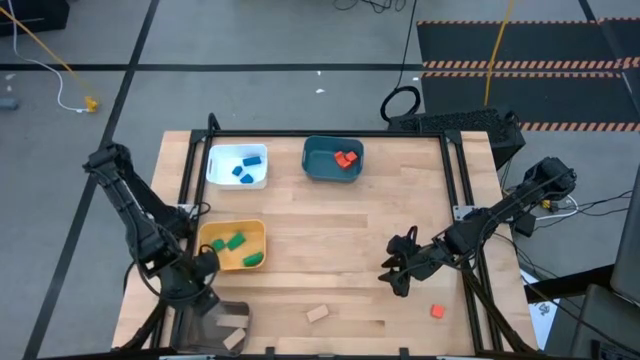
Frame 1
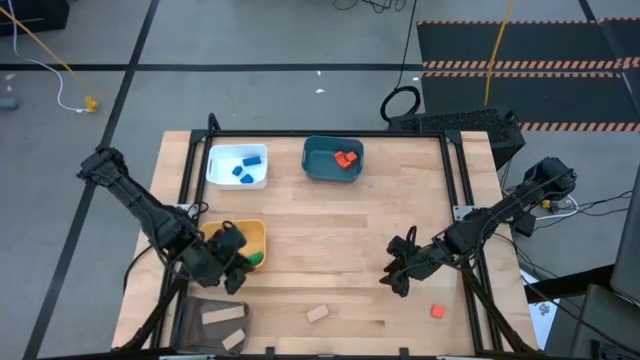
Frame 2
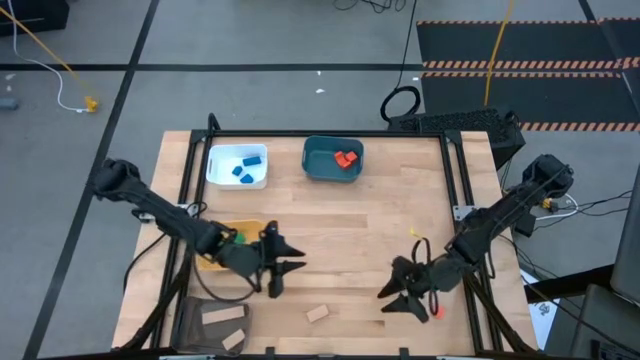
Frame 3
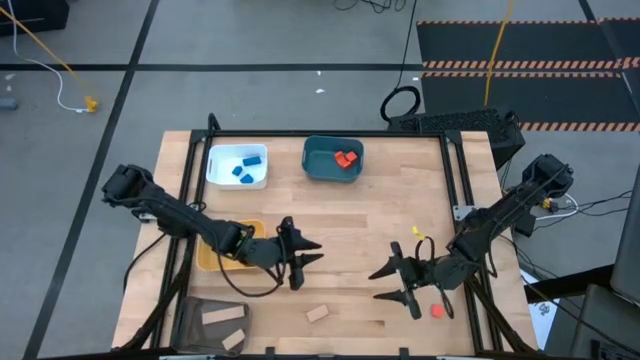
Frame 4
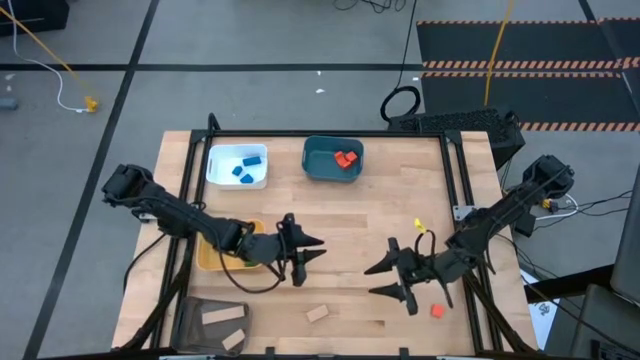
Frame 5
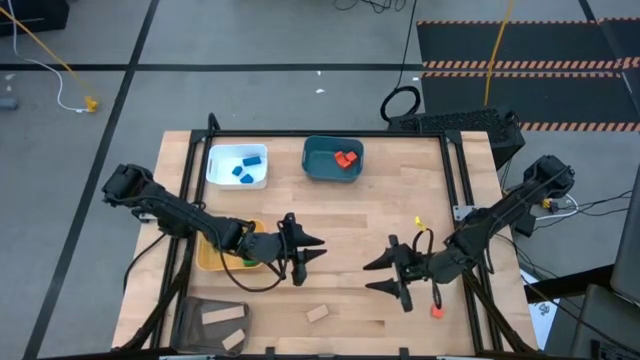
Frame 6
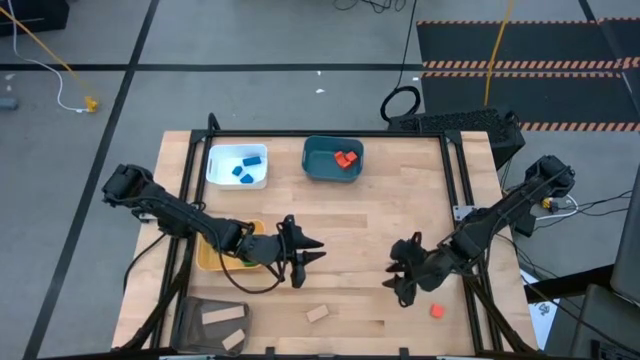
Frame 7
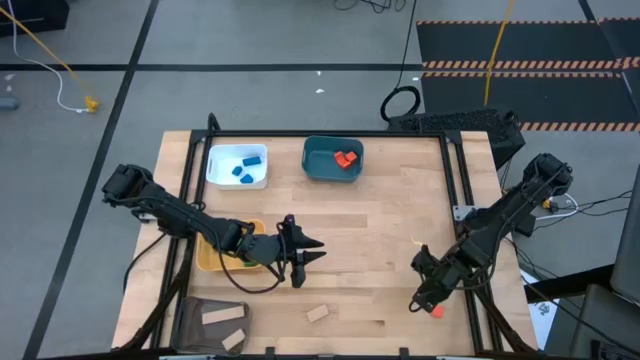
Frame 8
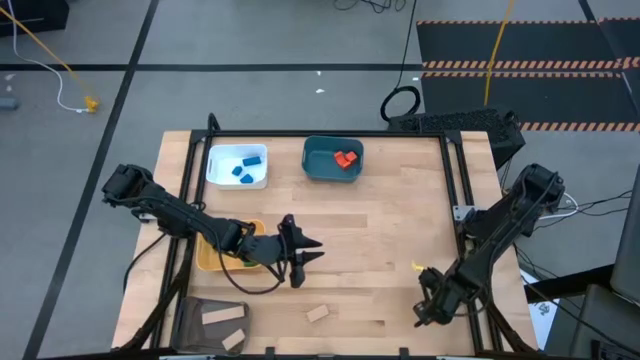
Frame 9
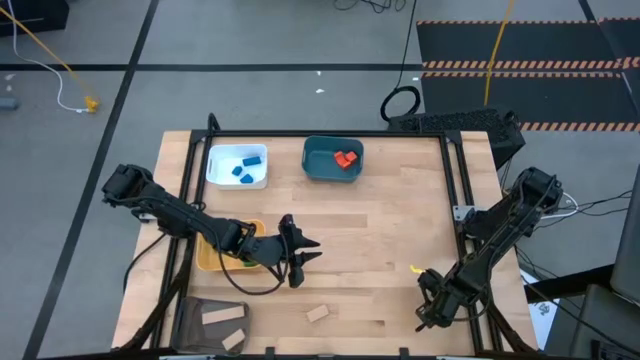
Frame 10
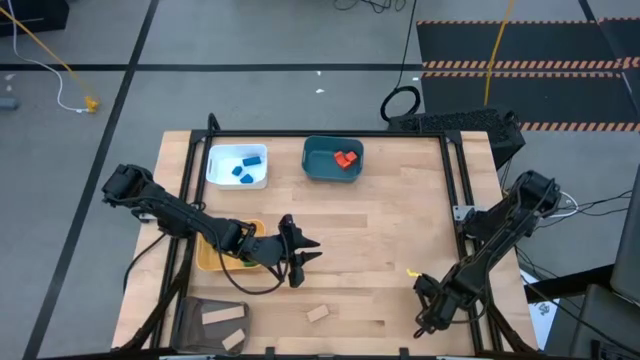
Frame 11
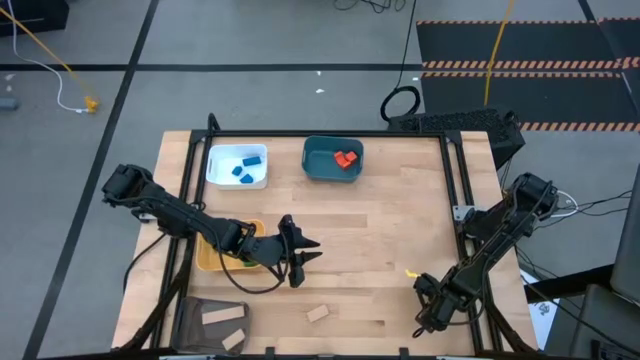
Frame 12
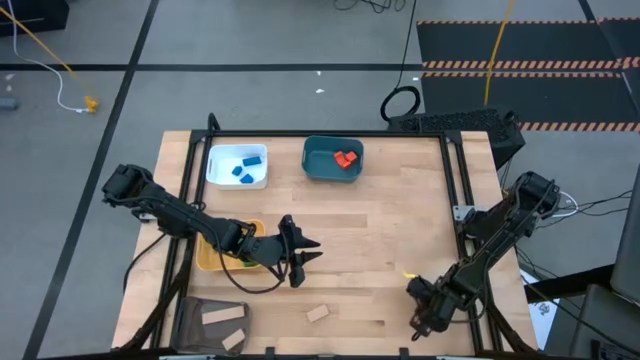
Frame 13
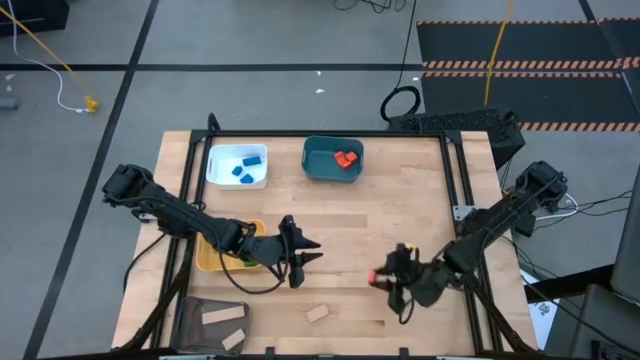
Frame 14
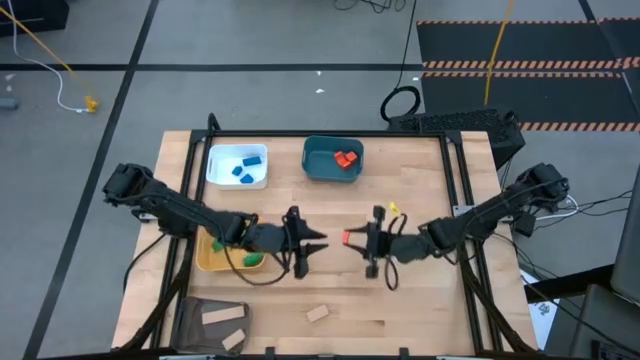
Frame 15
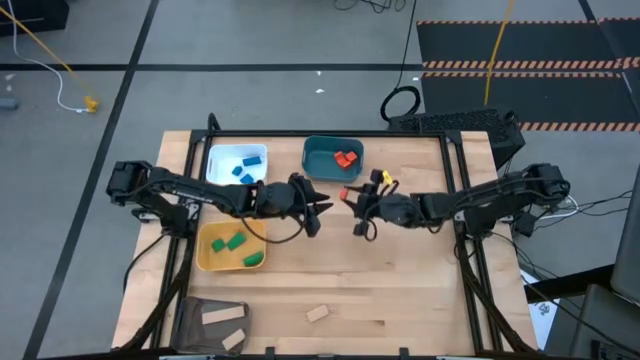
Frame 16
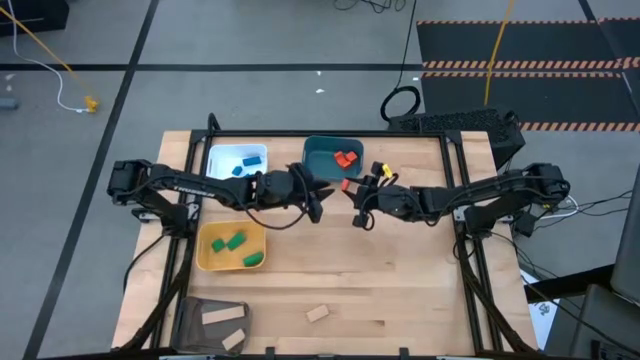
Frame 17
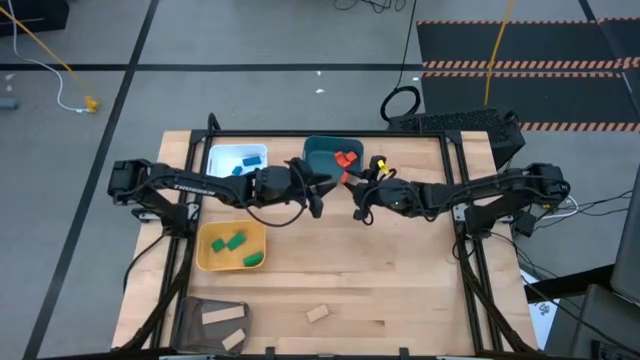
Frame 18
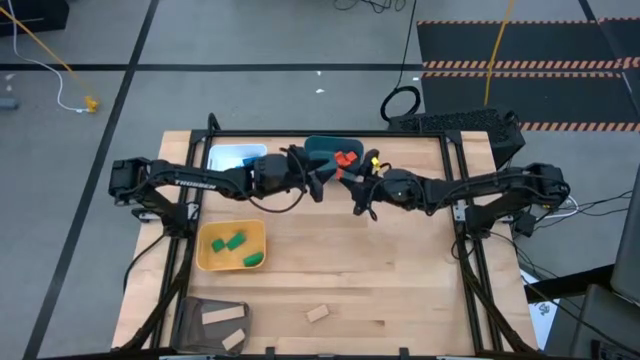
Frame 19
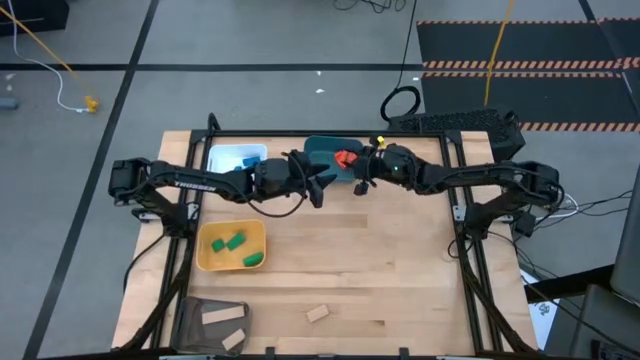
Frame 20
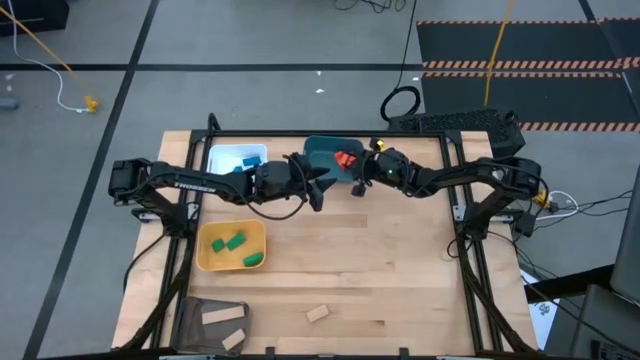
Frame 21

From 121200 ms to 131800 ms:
Task: Sort & place blocks by color
Put the orange wooden block into the blue bin

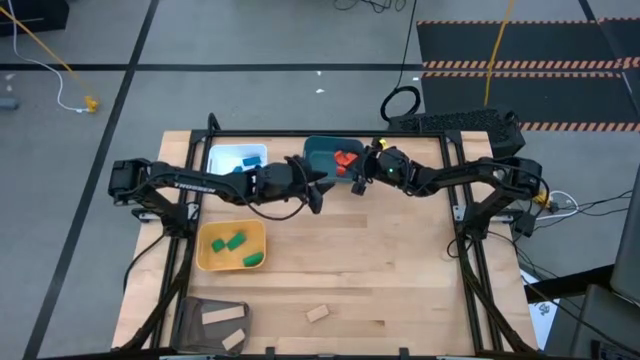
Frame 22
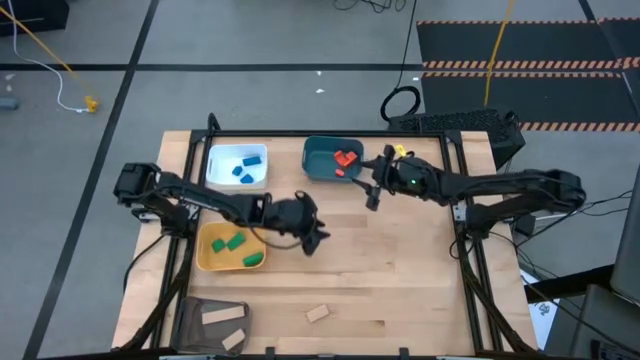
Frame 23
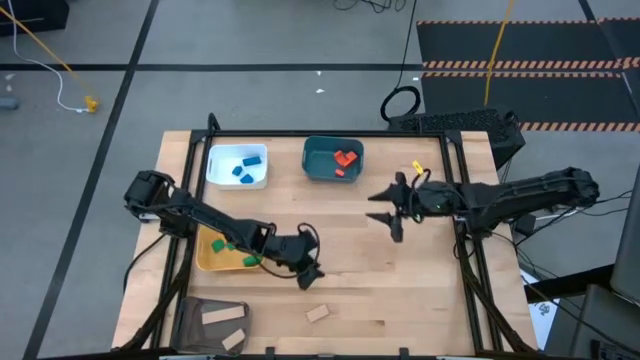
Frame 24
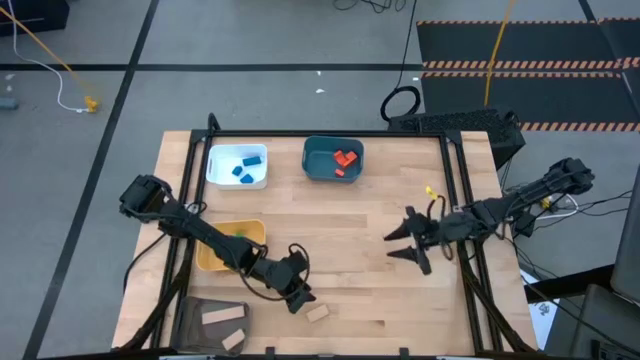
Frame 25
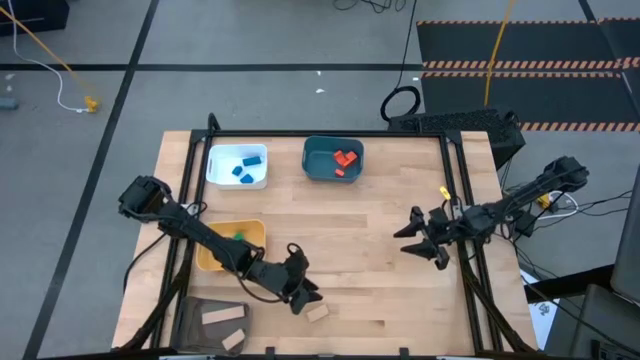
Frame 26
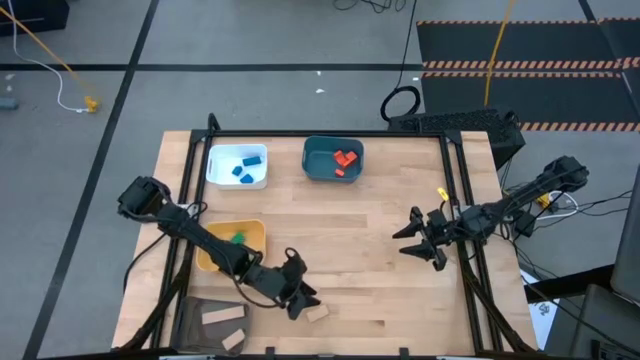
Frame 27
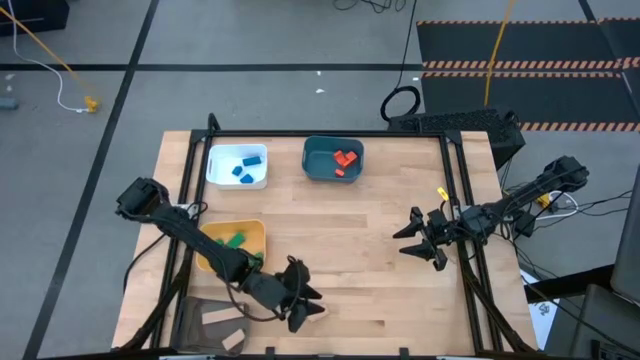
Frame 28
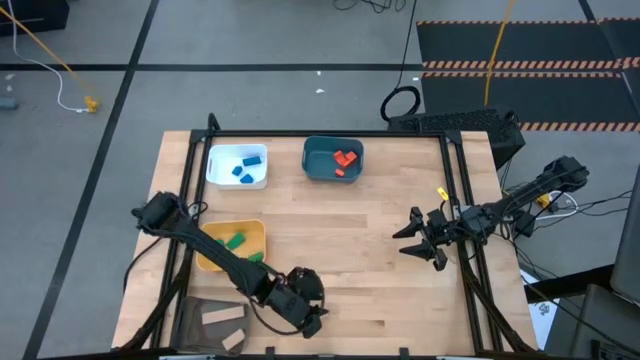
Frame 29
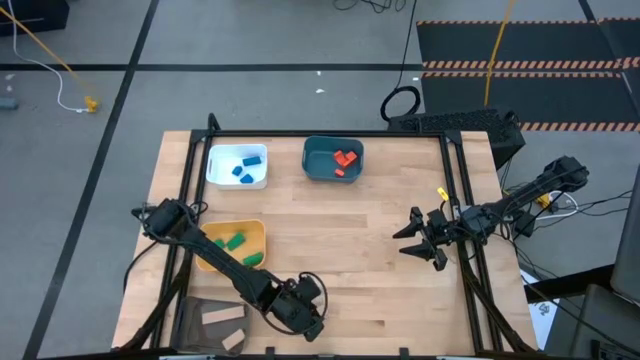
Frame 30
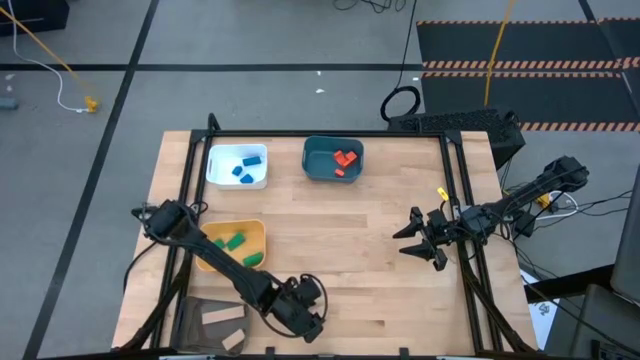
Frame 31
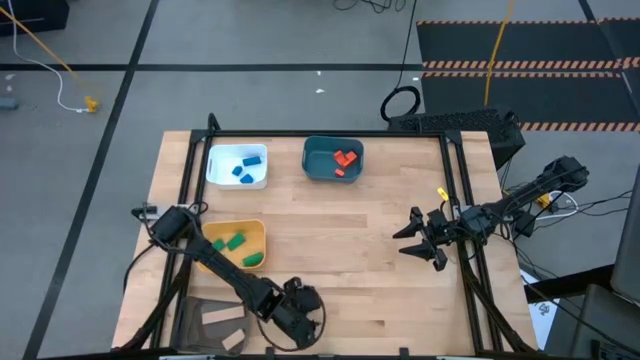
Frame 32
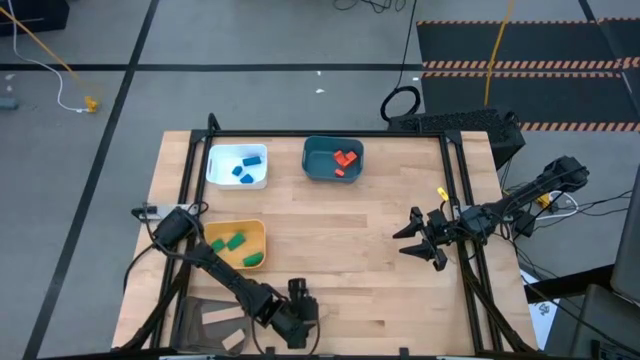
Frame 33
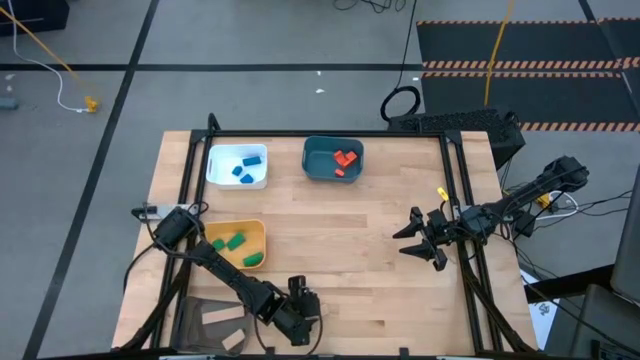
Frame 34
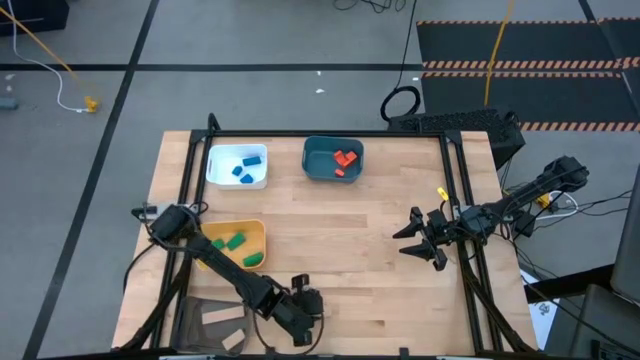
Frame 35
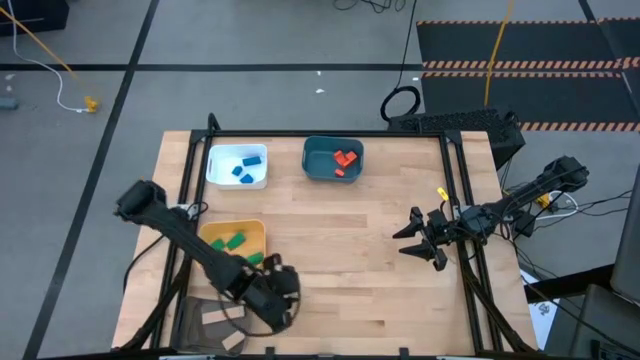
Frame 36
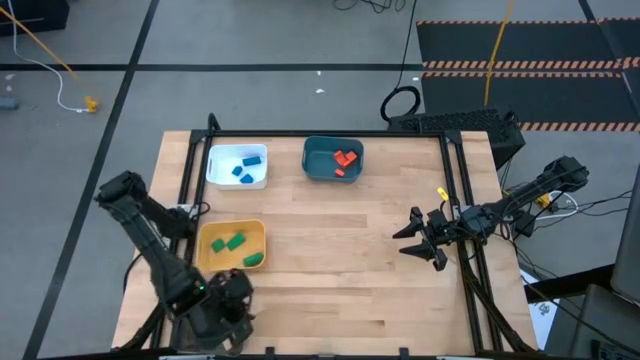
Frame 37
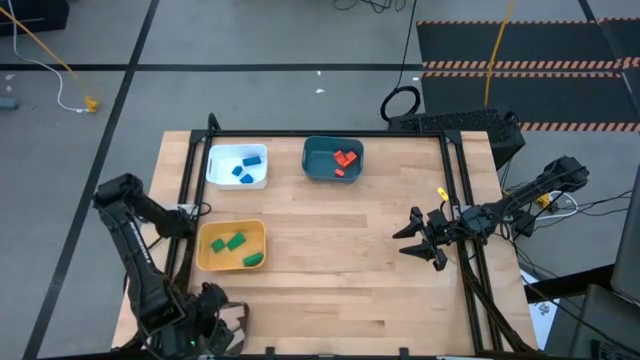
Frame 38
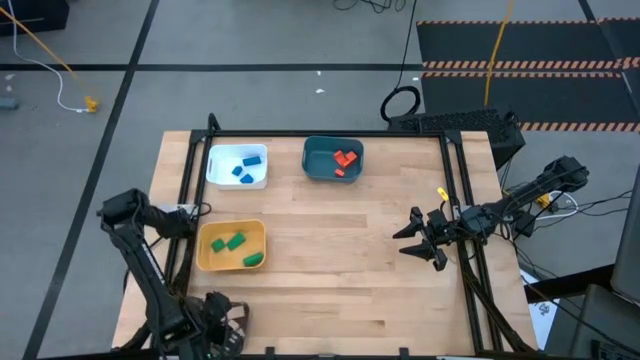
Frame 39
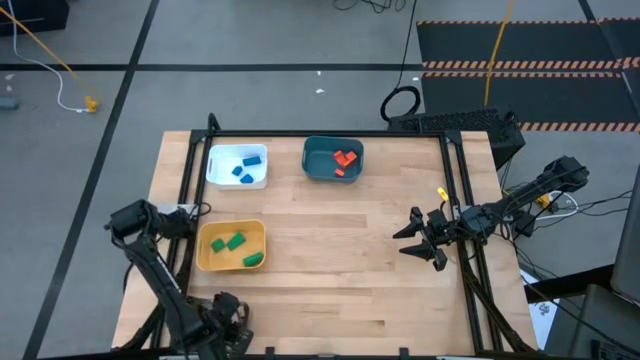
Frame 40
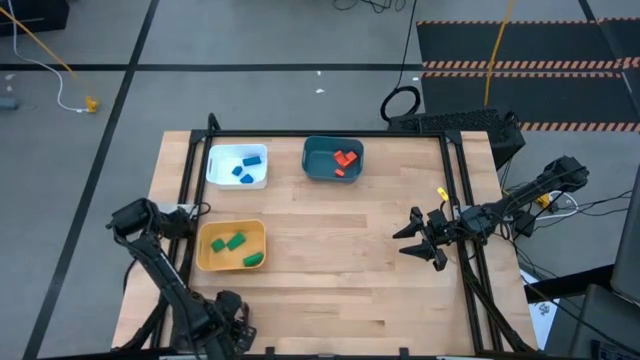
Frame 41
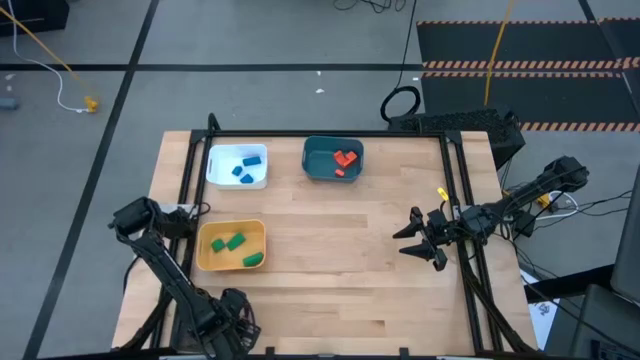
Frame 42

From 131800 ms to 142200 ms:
Put the brown wooden block into the black bin
